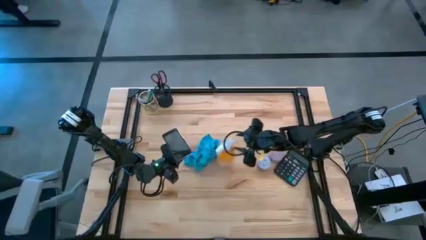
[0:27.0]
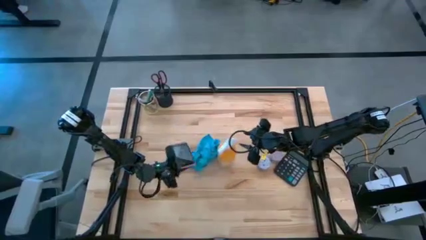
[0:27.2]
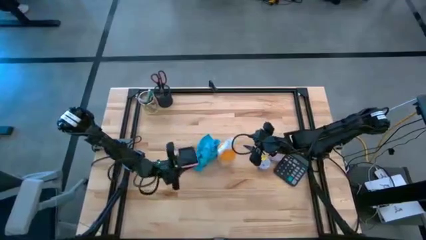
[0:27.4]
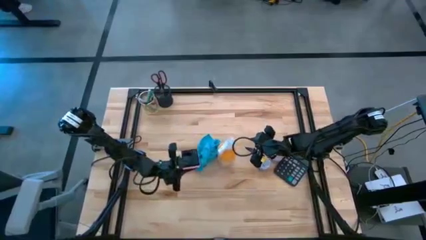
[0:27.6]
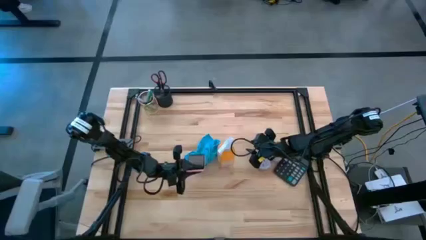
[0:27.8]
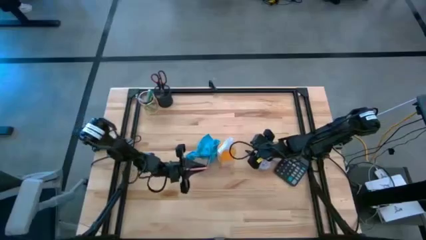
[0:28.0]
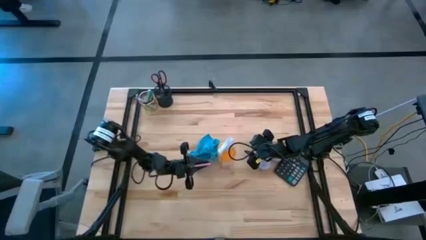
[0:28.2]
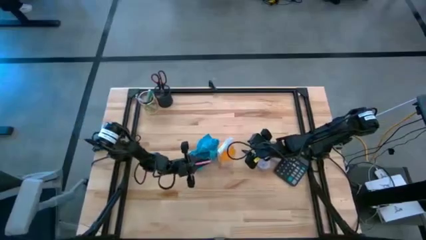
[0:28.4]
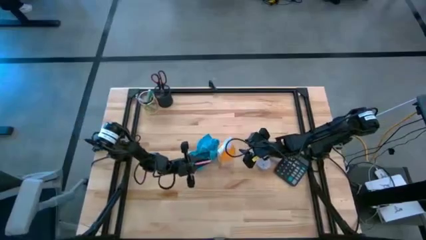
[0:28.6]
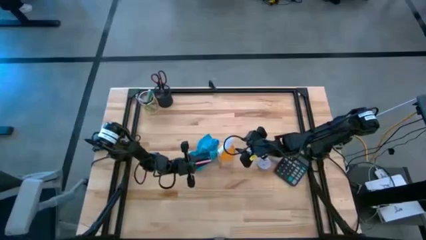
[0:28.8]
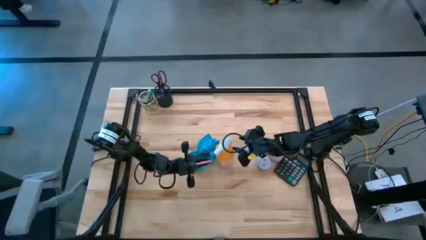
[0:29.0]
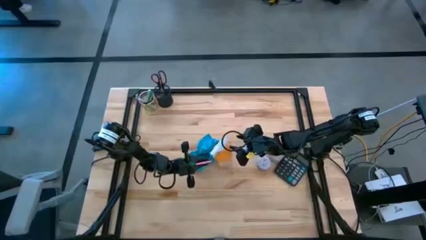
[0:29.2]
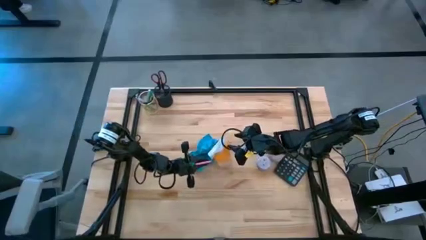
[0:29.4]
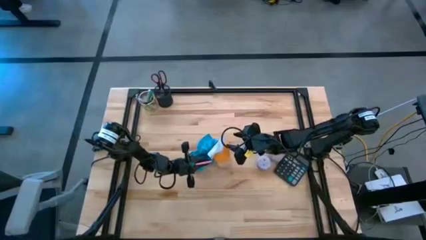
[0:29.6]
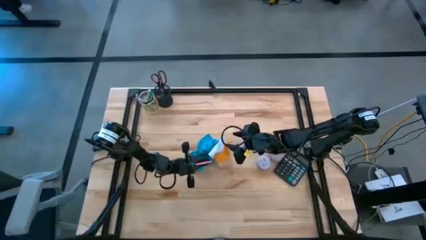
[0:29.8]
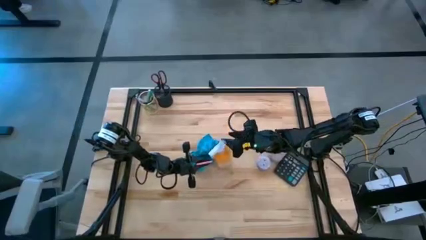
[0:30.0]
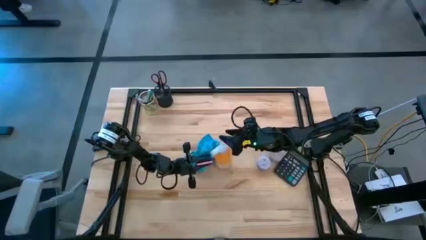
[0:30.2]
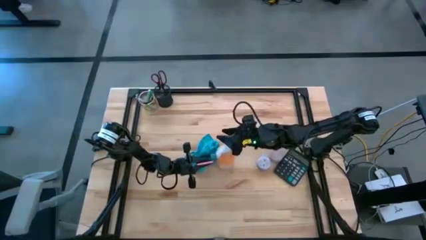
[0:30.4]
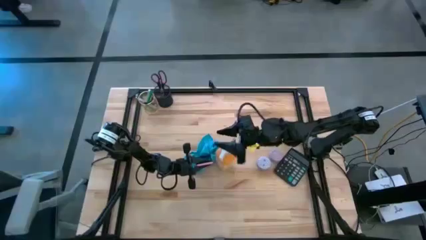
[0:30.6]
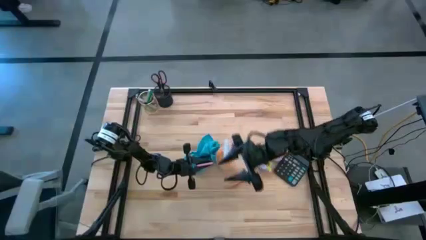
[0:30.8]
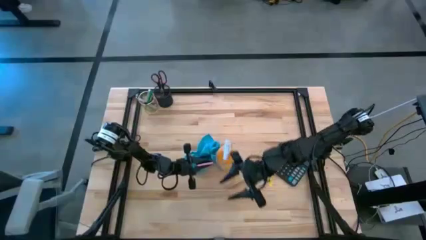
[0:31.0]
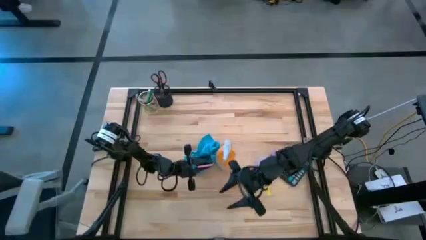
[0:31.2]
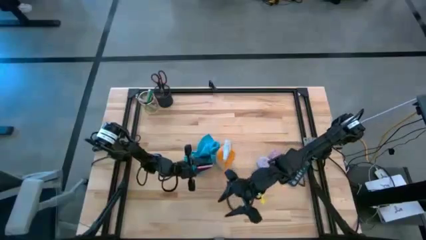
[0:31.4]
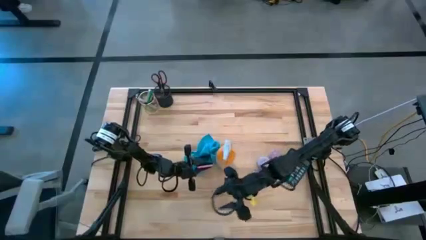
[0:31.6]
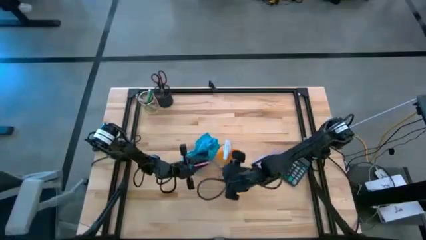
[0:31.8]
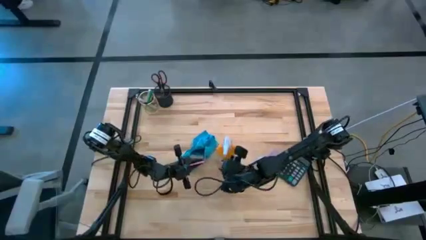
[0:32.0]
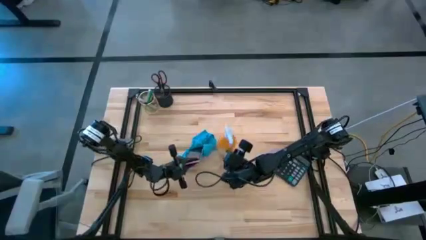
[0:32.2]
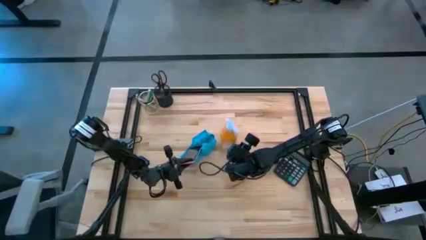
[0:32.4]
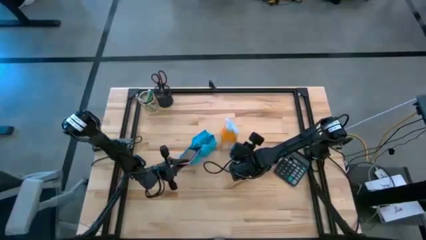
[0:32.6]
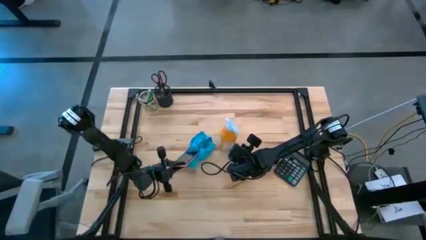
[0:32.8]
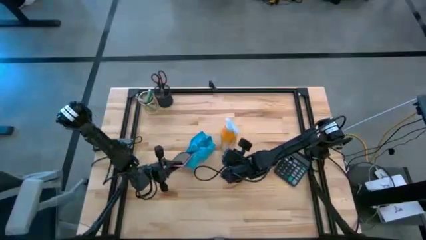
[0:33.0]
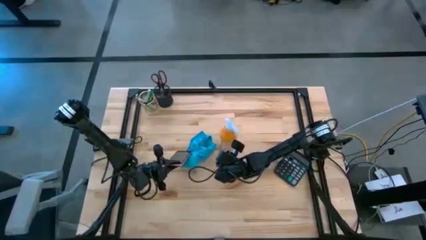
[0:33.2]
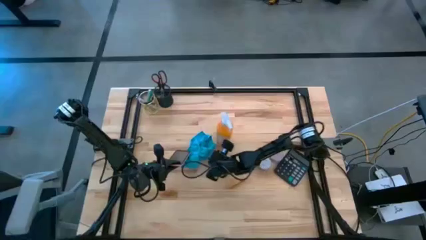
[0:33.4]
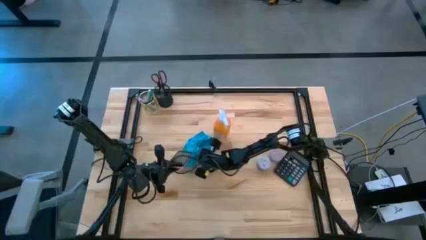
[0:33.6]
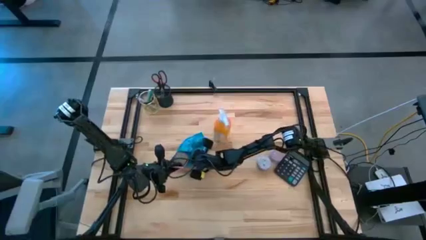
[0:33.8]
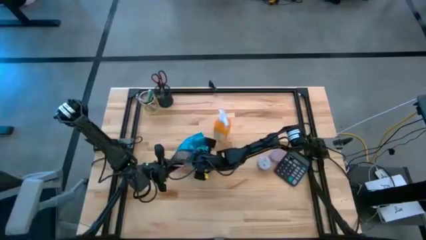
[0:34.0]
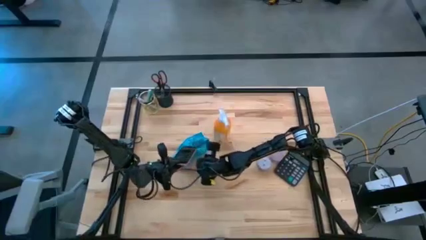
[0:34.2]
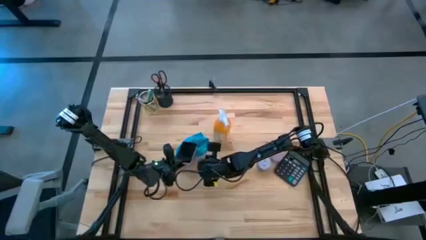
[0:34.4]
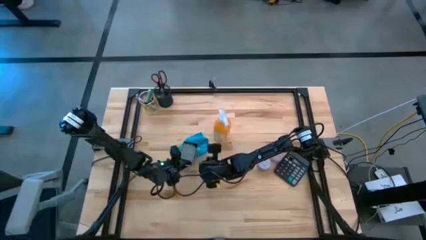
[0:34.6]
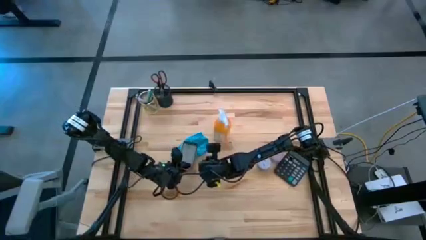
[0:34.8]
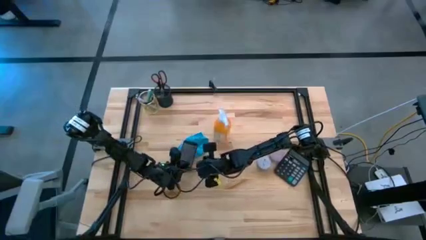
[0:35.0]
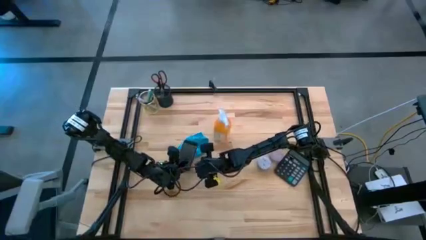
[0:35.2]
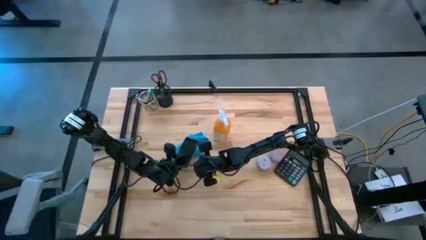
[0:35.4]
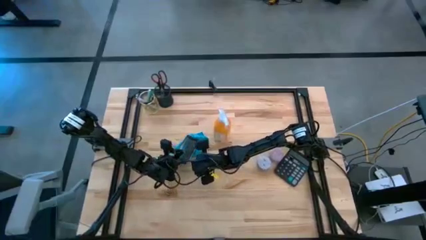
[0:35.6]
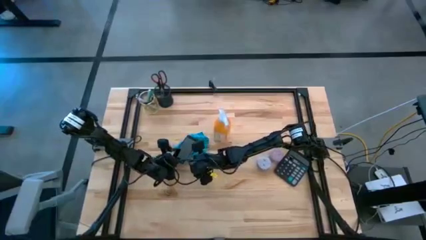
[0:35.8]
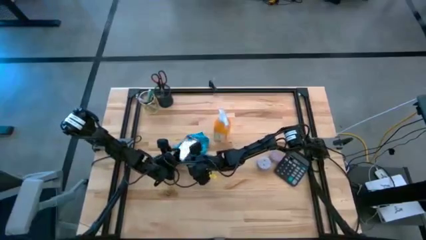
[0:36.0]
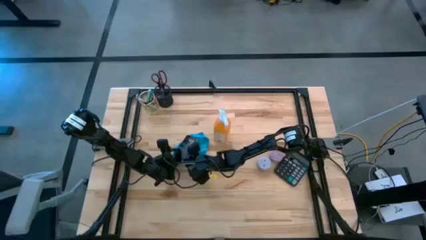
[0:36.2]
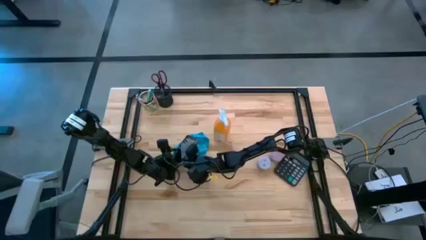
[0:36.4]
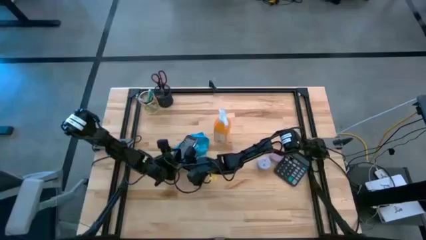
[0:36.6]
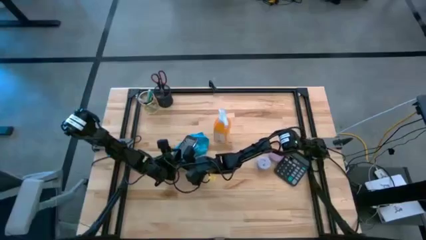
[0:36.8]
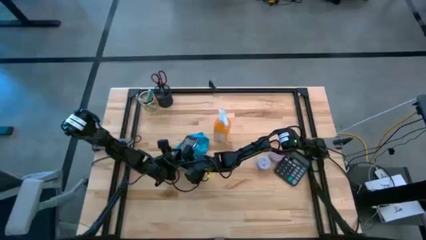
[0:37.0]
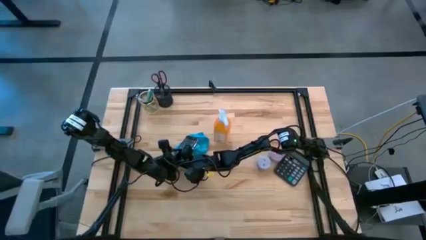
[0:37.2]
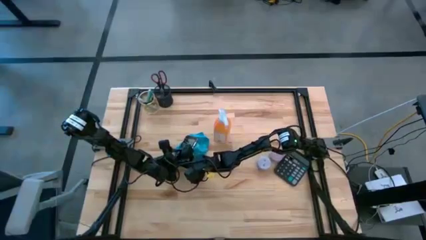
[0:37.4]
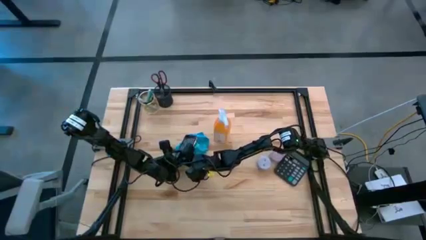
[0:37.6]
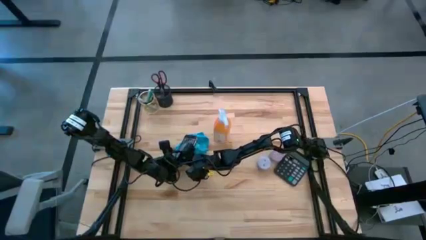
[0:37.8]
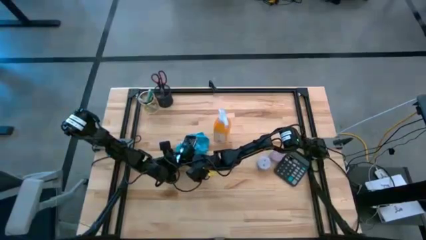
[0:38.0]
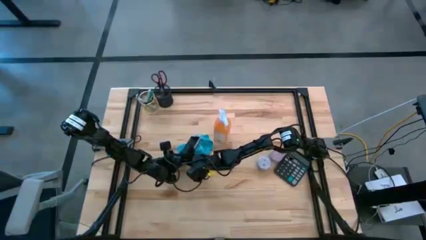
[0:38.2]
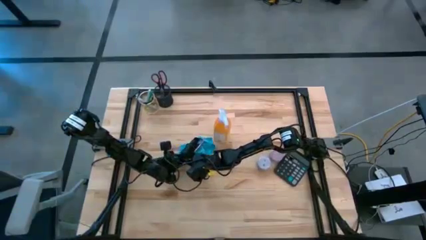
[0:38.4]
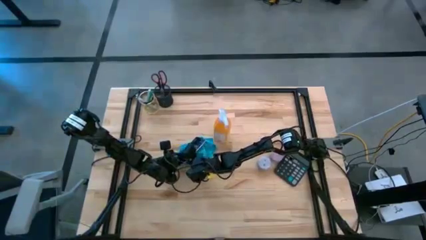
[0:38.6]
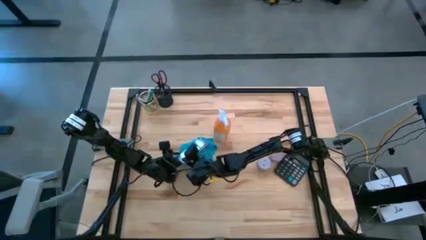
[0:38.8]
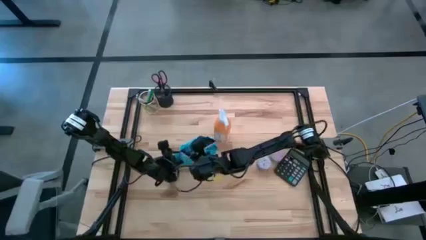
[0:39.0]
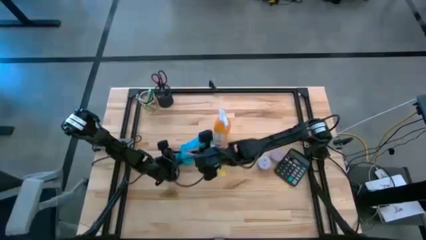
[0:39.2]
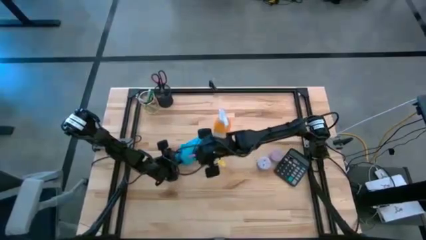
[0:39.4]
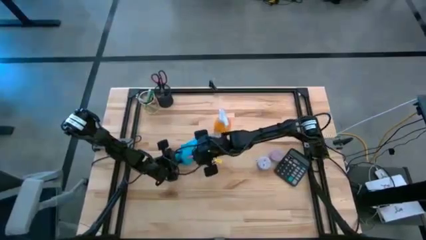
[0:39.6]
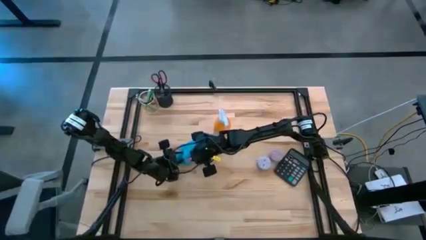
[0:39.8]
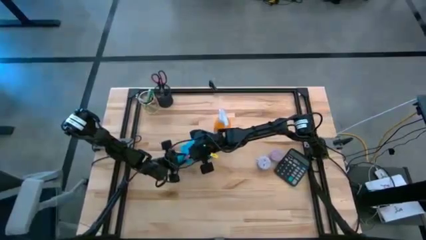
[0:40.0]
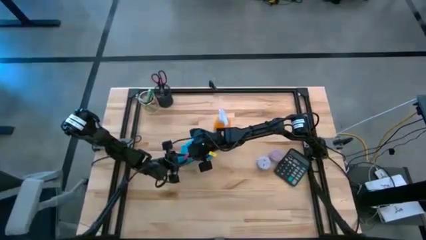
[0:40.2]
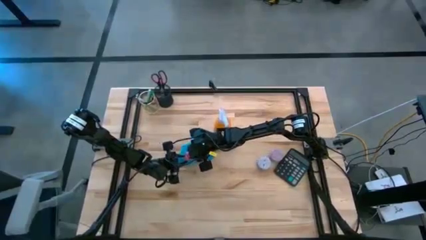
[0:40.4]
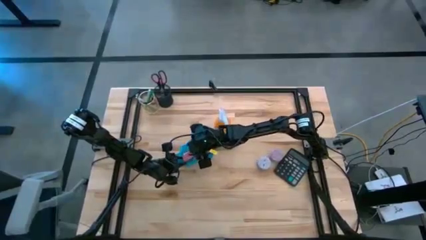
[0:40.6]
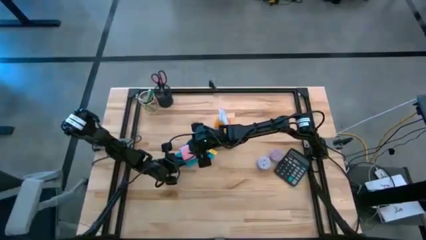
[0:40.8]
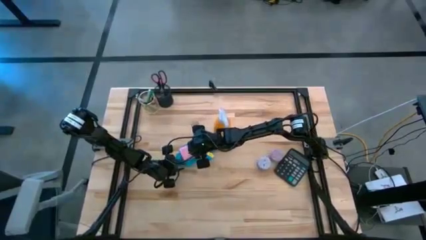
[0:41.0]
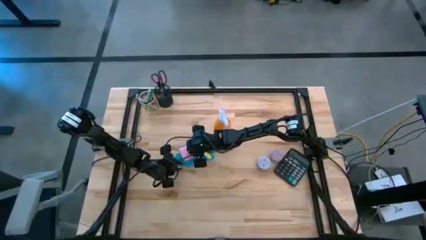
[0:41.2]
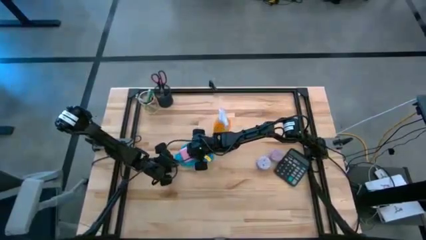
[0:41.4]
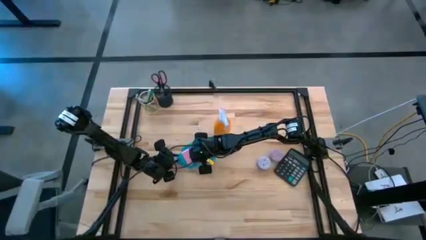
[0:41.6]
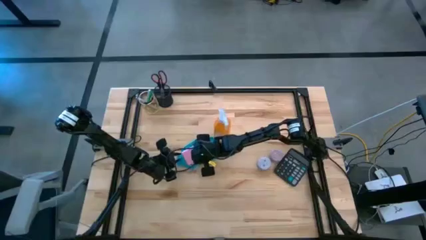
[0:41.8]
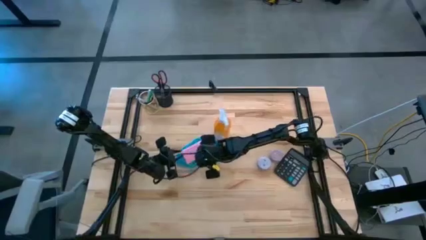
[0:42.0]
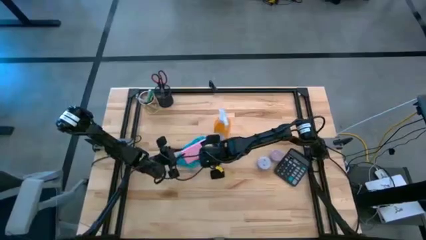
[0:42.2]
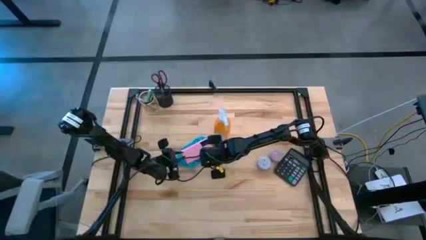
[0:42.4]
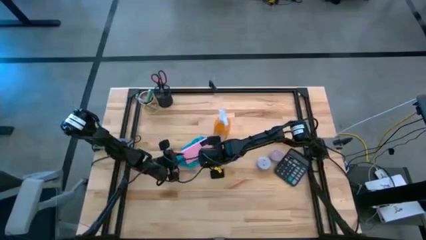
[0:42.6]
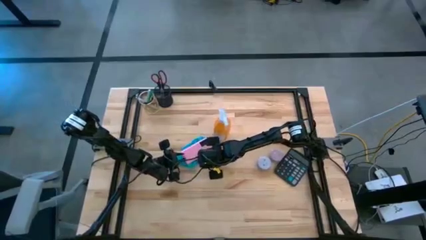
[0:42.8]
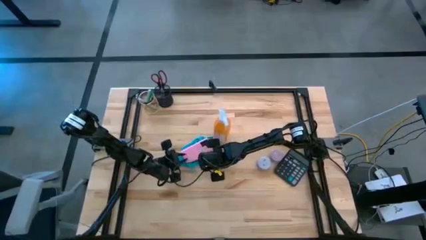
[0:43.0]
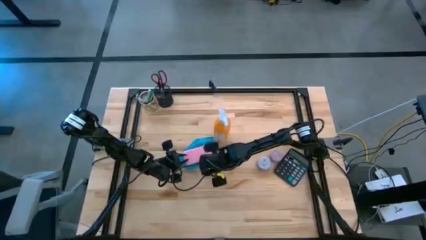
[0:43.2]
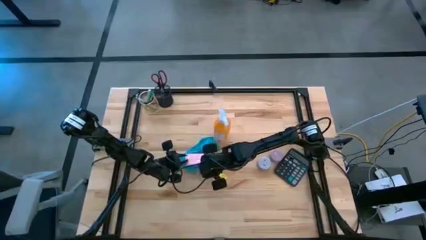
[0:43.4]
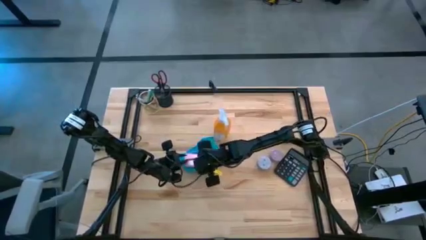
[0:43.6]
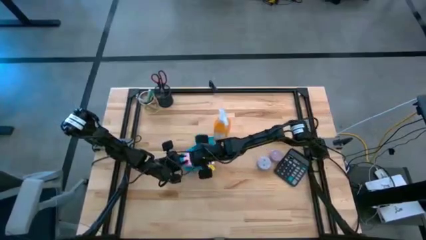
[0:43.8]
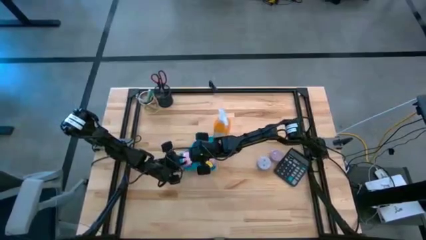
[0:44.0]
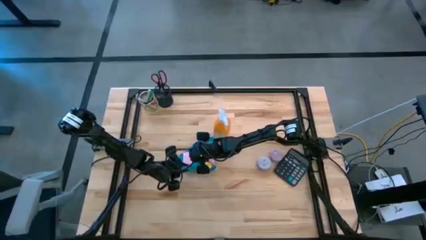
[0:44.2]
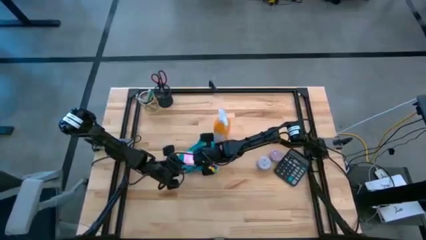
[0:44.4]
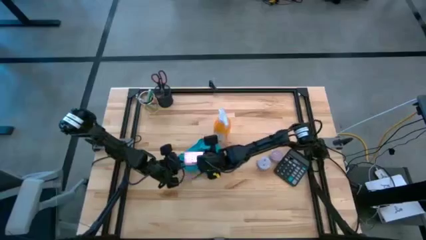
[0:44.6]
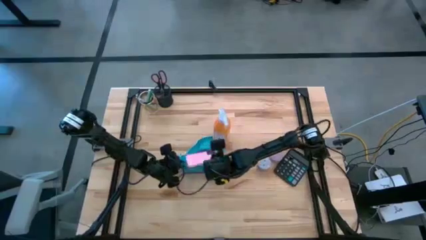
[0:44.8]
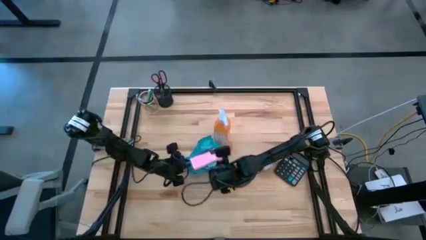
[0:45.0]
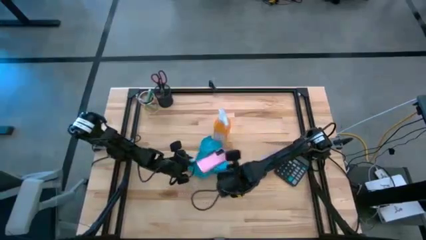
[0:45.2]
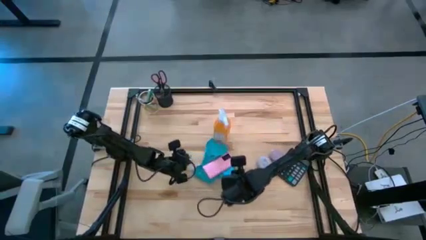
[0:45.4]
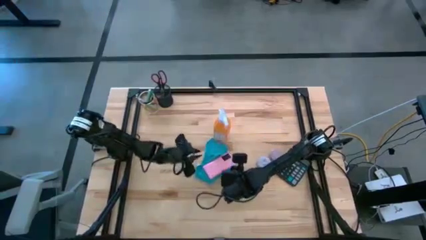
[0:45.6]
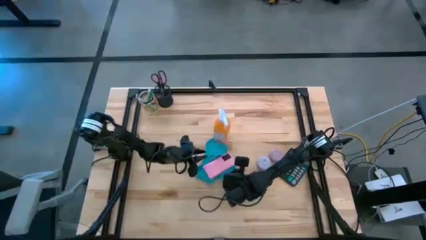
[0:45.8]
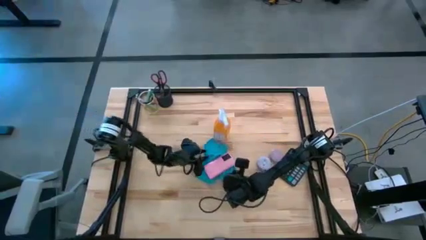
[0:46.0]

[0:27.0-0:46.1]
Task: Apply microfiber cloth
Wipe the front and back of the cellphone using the blue microfiber cloth
